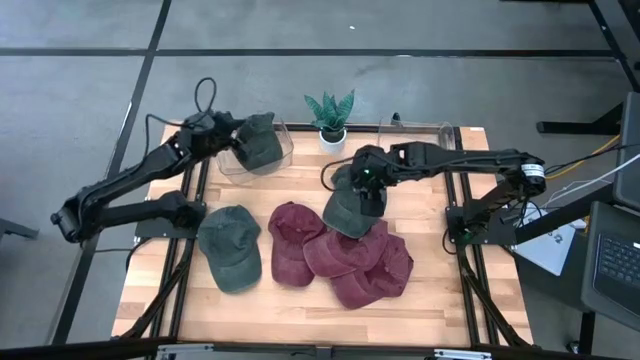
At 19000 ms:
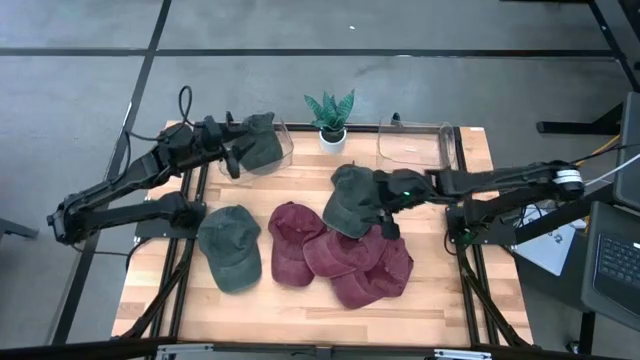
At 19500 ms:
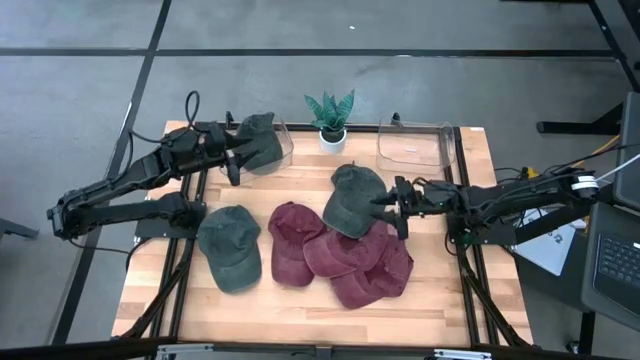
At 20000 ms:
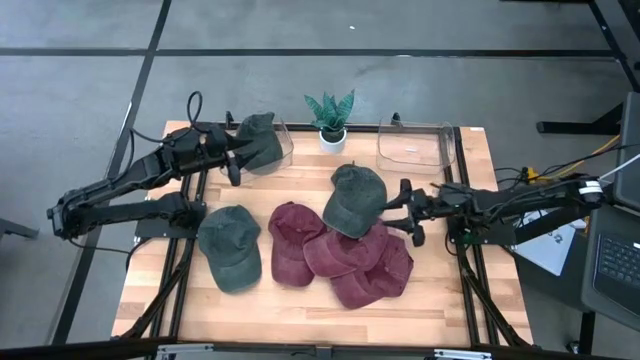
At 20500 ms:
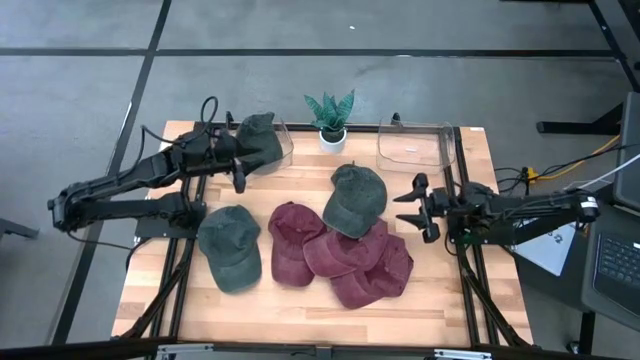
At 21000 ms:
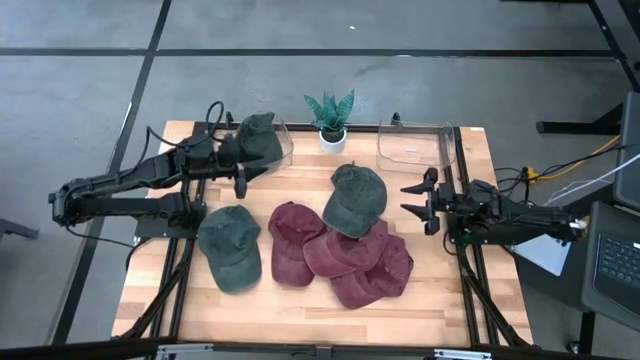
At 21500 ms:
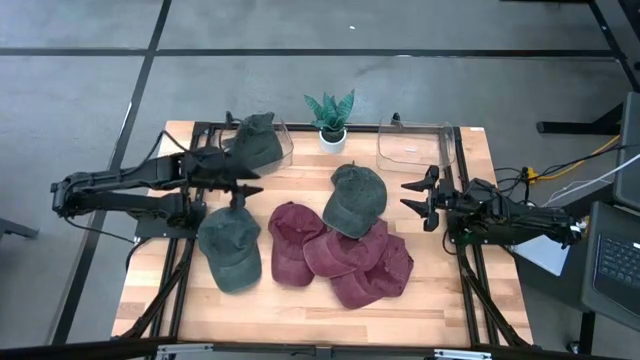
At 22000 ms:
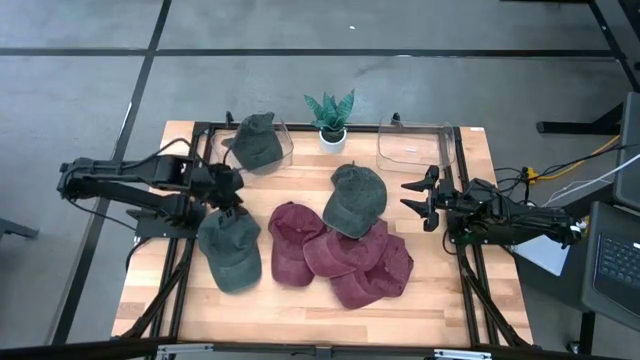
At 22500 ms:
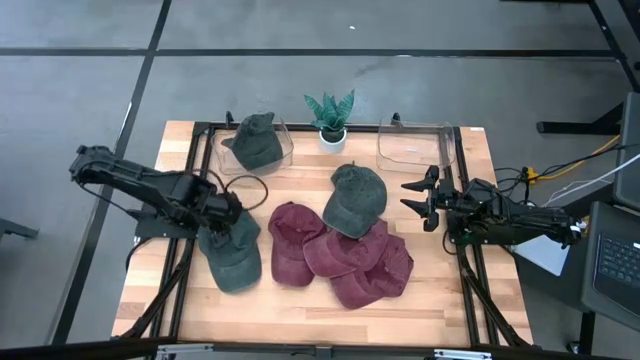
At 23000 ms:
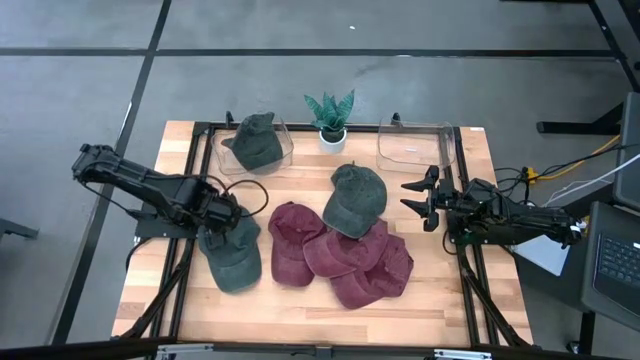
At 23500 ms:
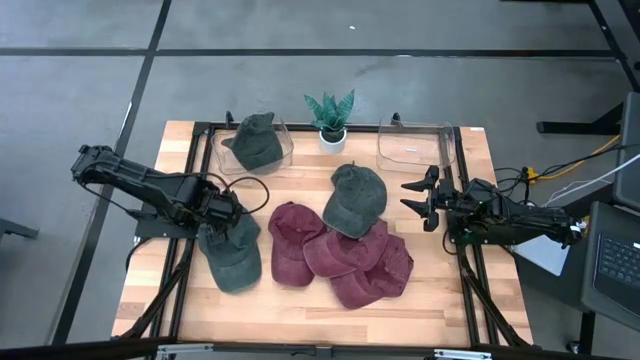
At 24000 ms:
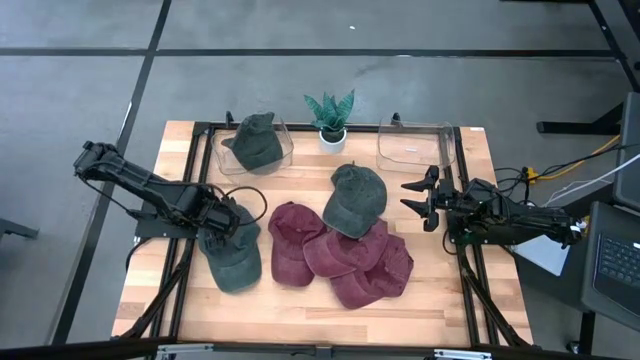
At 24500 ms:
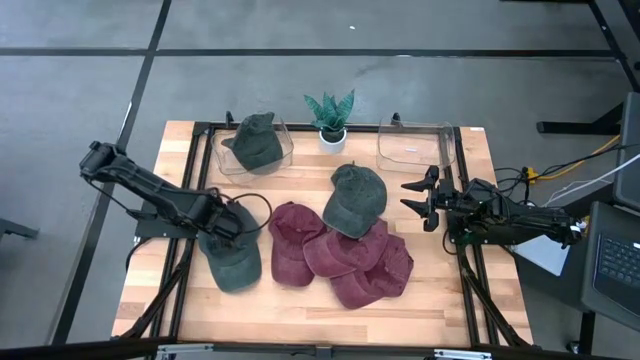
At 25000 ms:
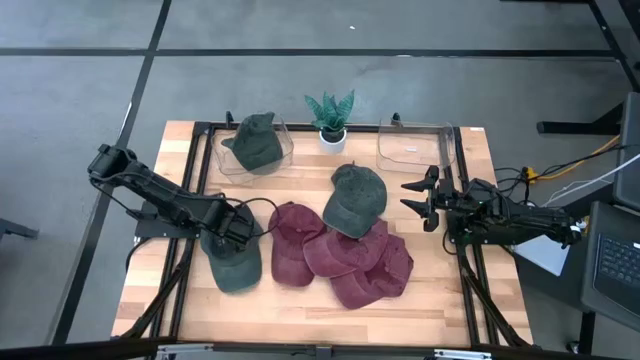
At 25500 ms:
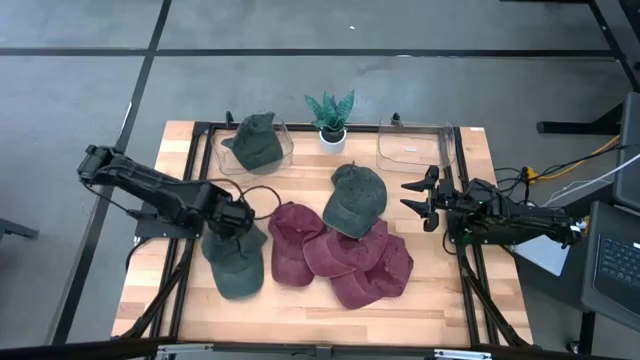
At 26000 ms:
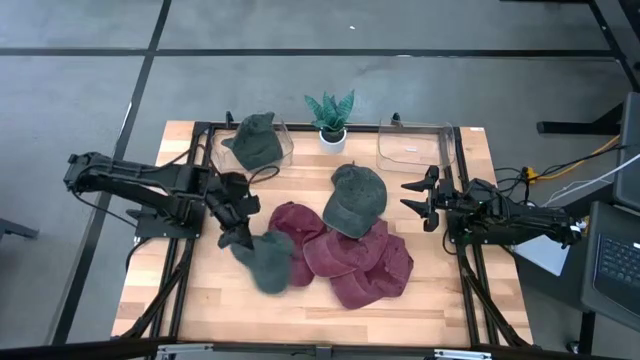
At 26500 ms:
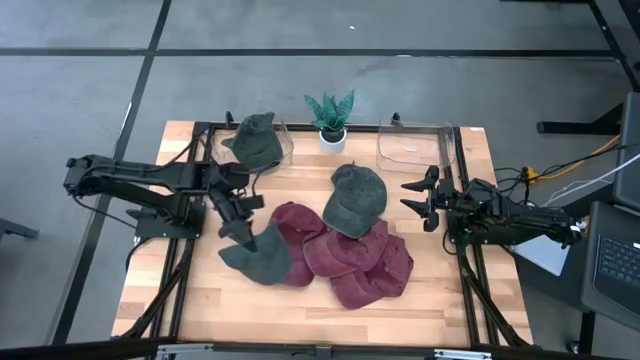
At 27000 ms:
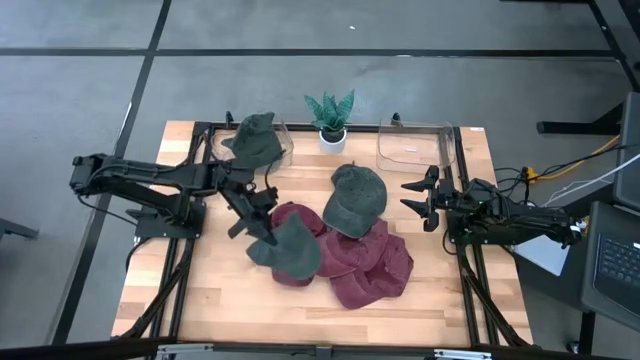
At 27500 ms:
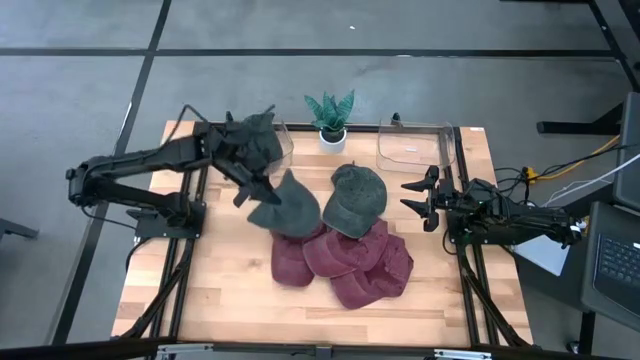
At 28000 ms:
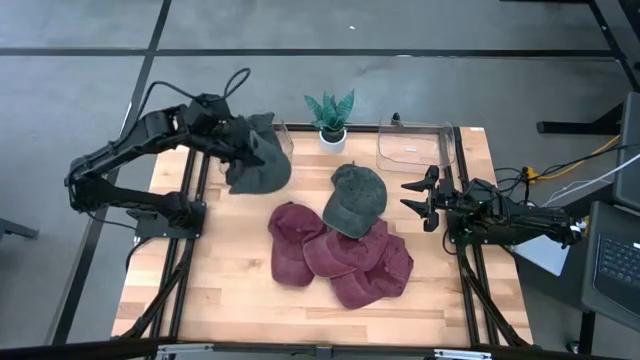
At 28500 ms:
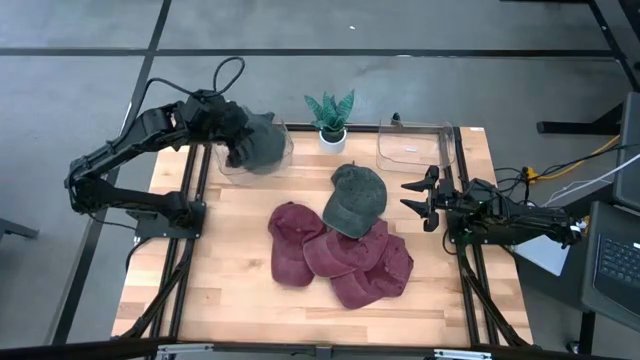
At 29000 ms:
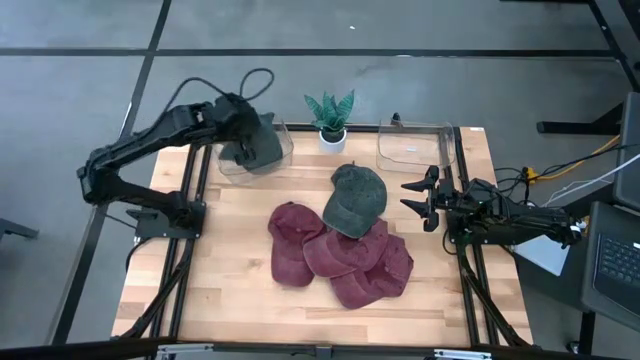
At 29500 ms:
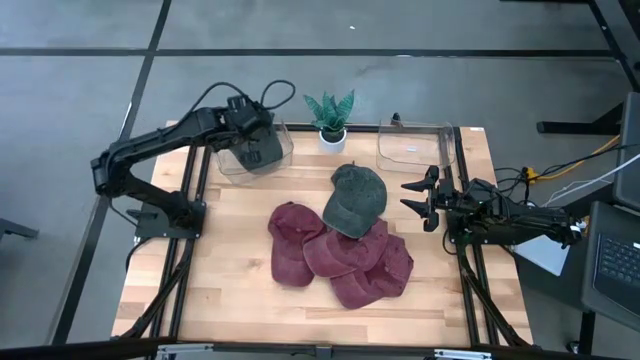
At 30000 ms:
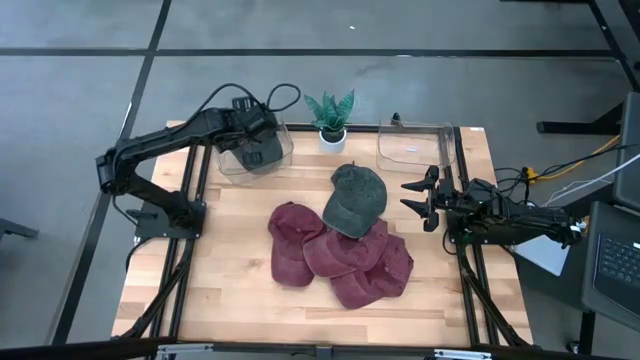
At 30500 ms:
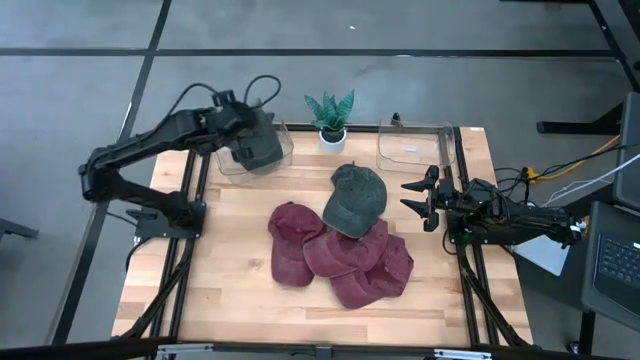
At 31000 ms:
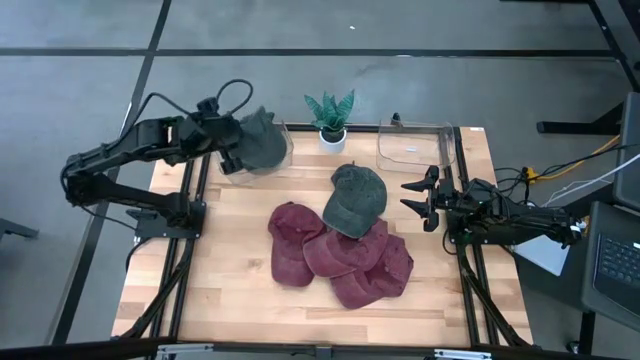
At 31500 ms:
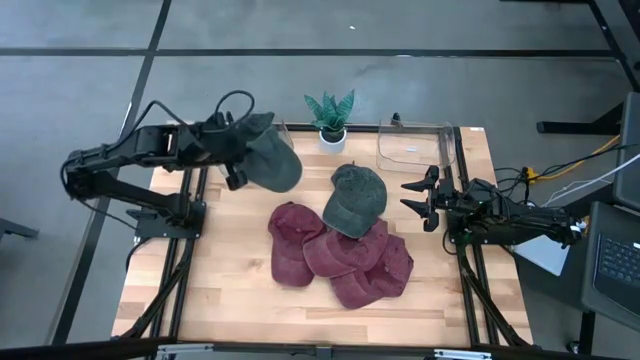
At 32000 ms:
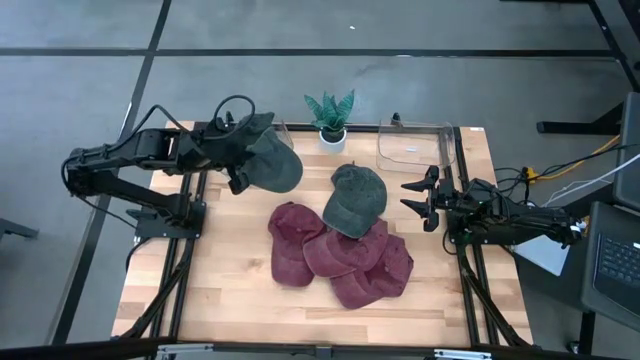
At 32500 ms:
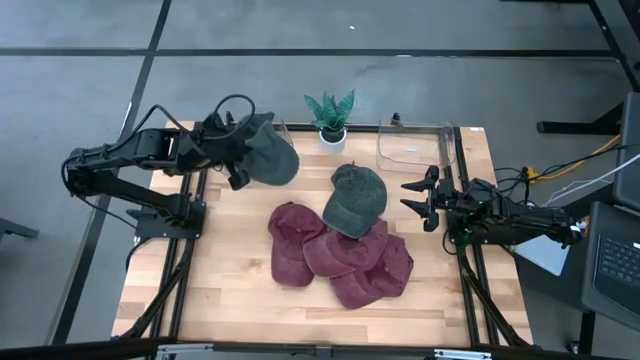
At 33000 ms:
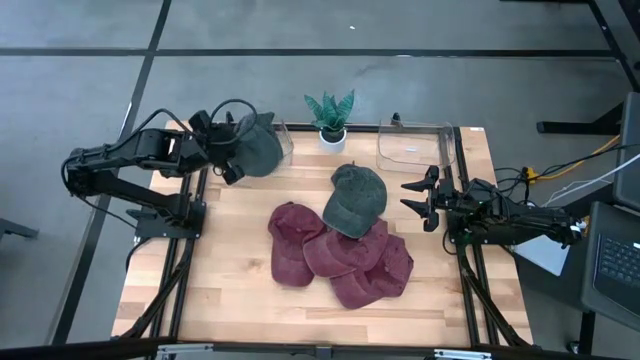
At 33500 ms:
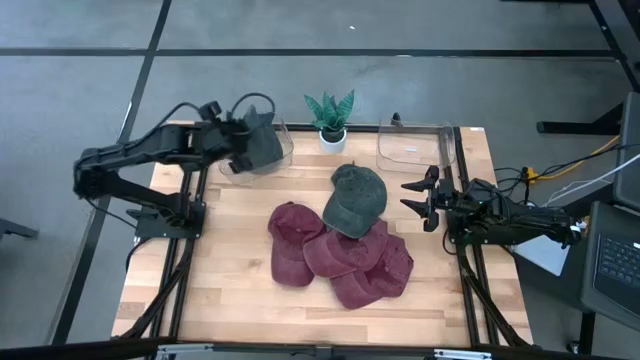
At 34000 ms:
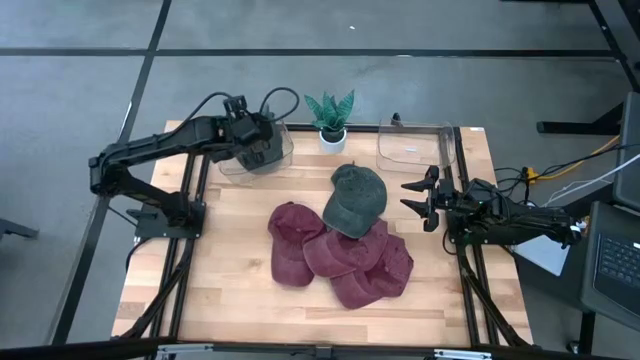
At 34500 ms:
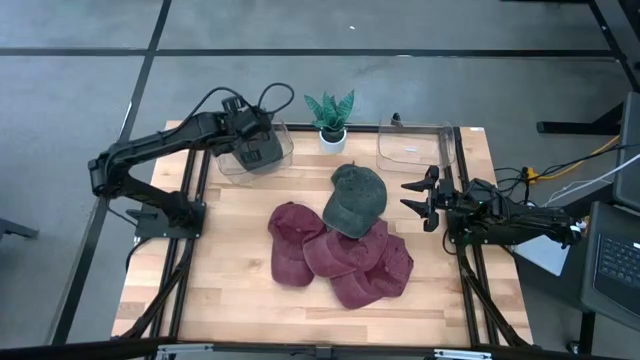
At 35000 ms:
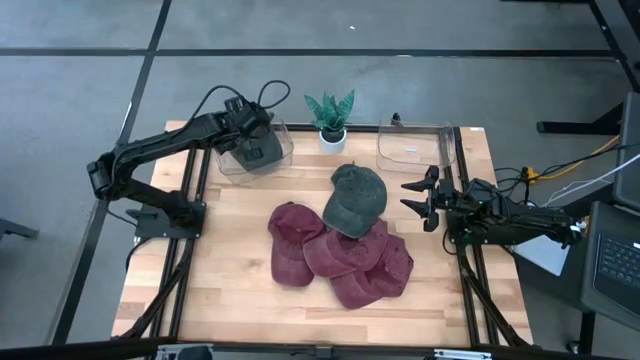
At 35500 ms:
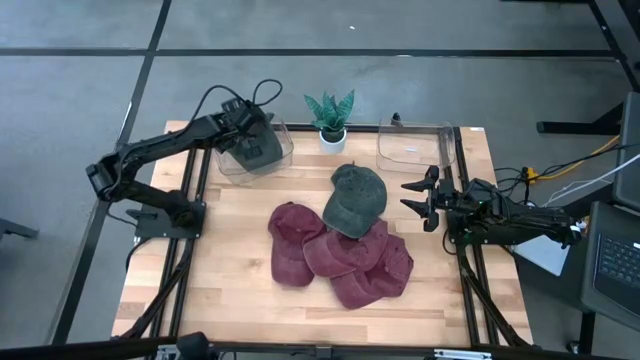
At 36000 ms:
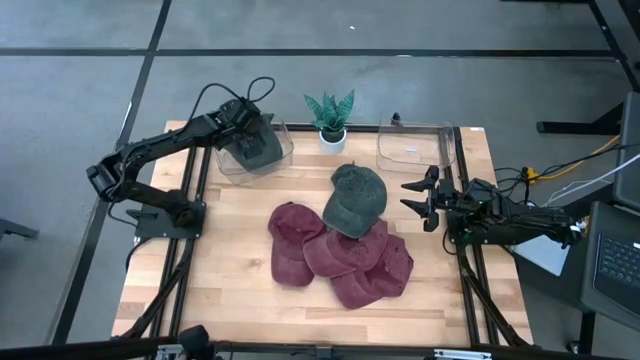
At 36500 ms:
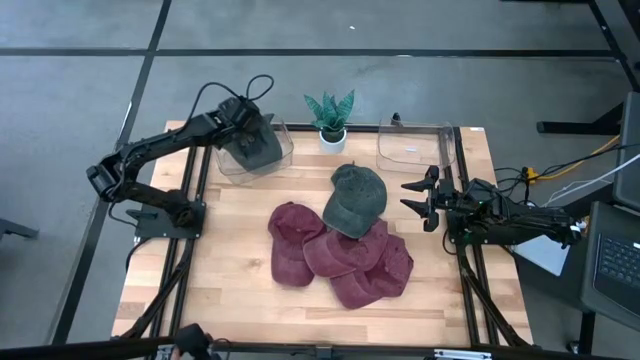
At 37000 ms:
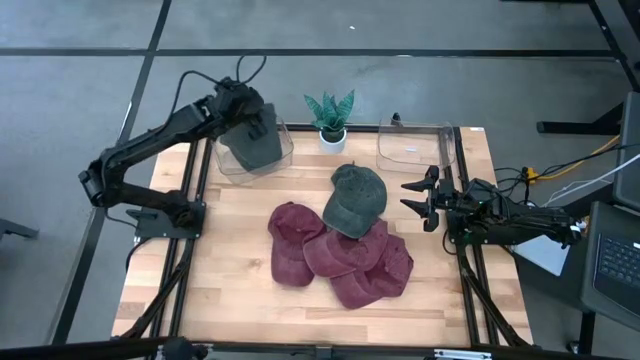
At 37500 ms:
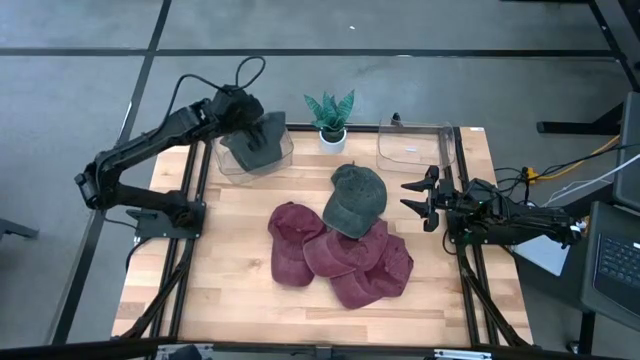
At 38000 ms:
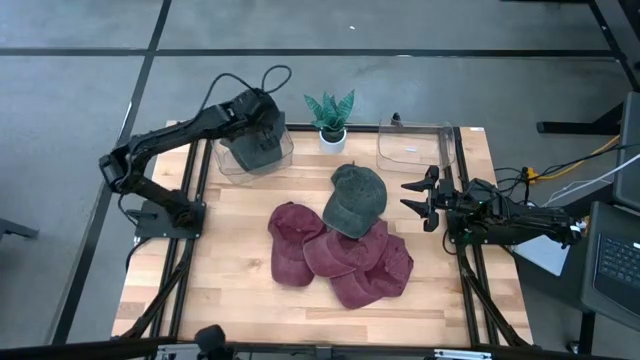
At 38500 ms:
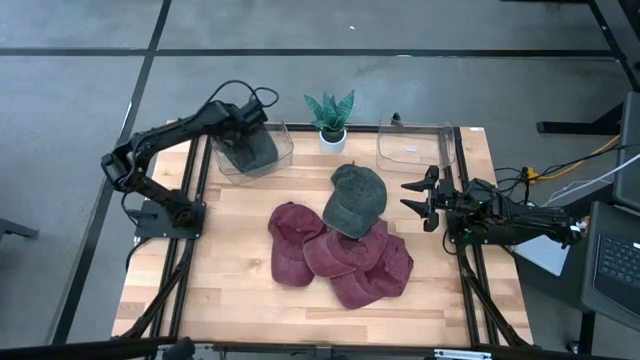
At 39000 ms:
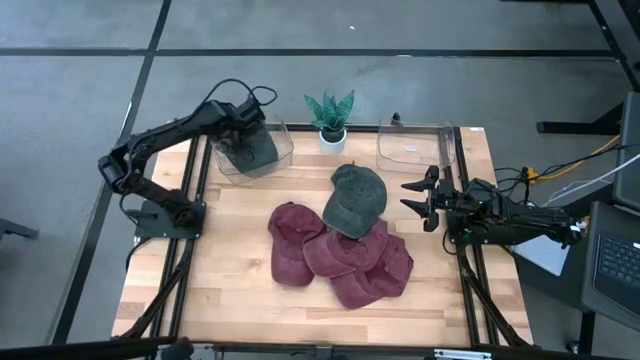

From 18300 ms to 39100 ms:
Task: Pick & Place hat
Put the left black cap into the left transparent bin
